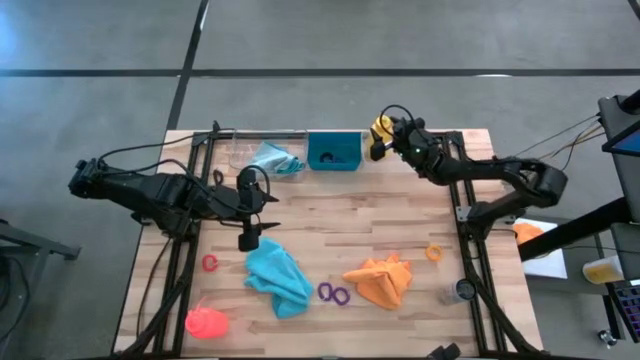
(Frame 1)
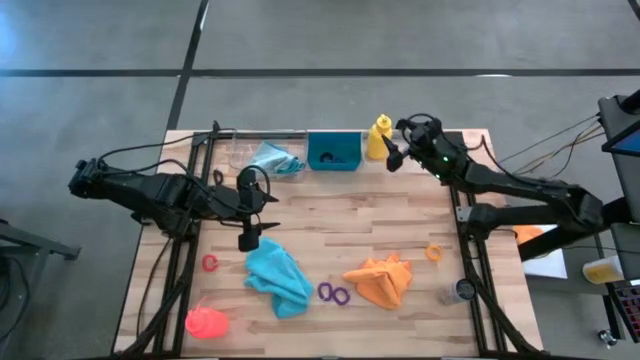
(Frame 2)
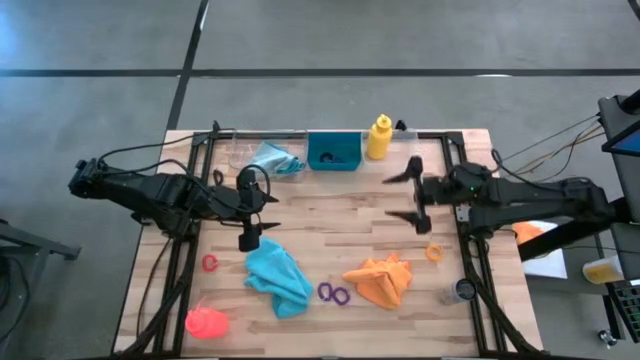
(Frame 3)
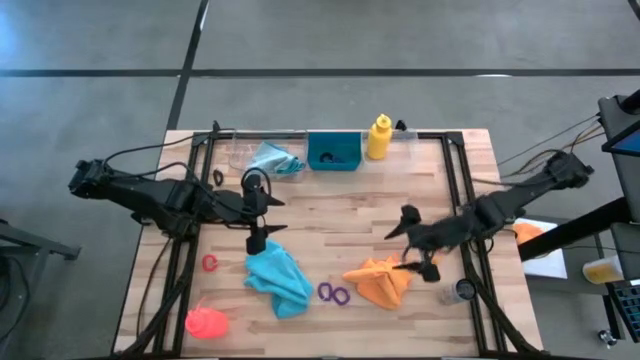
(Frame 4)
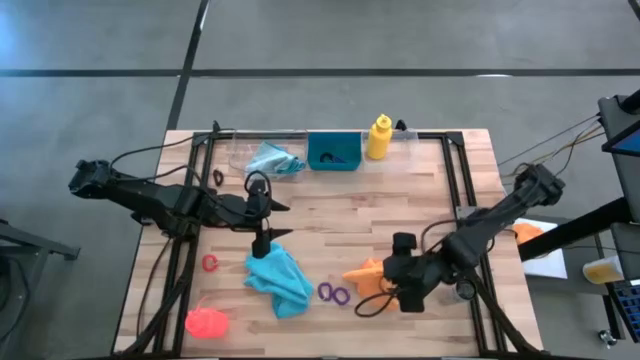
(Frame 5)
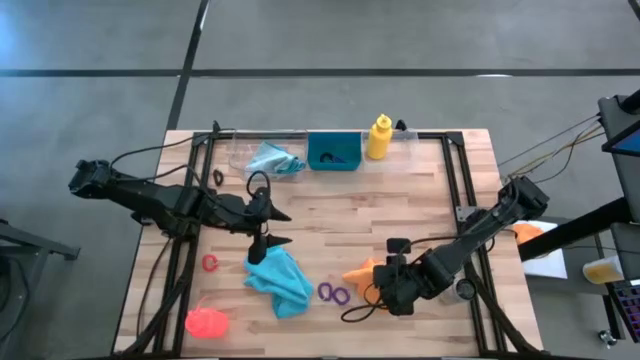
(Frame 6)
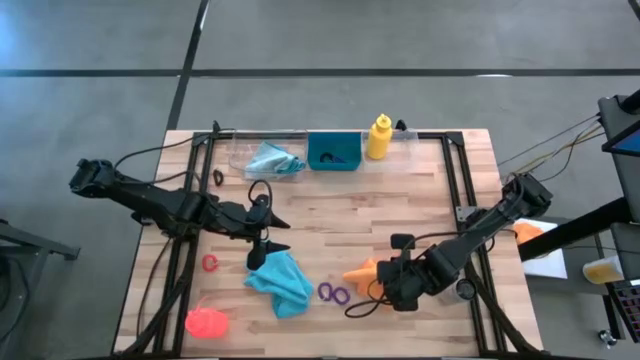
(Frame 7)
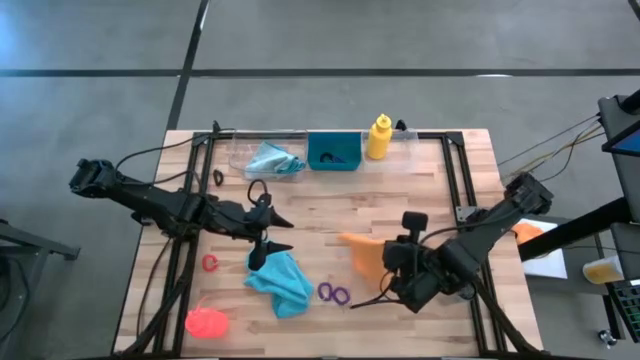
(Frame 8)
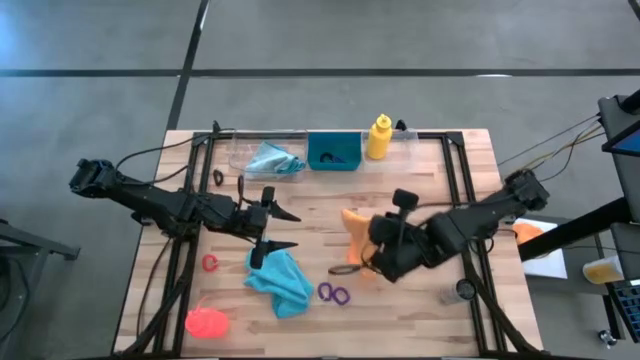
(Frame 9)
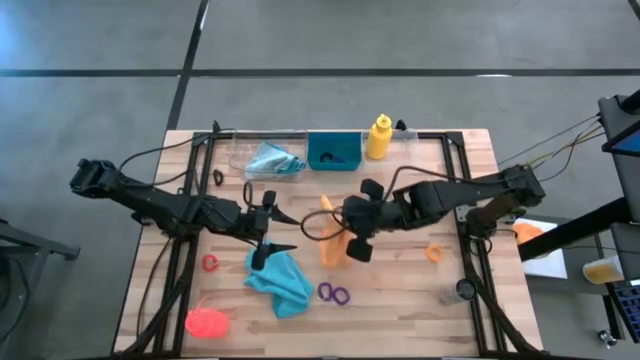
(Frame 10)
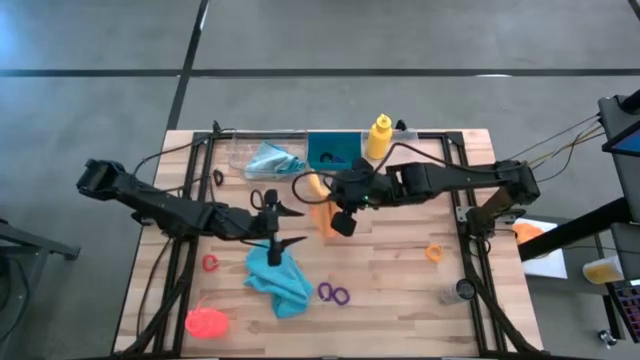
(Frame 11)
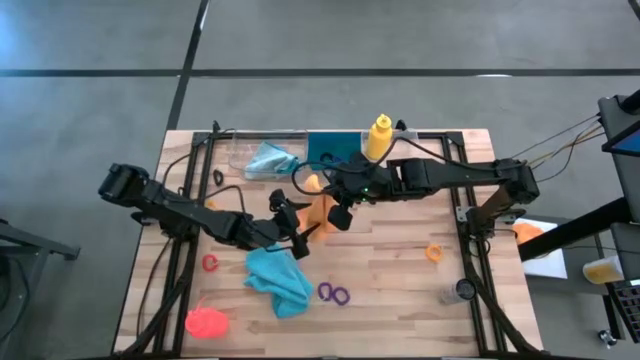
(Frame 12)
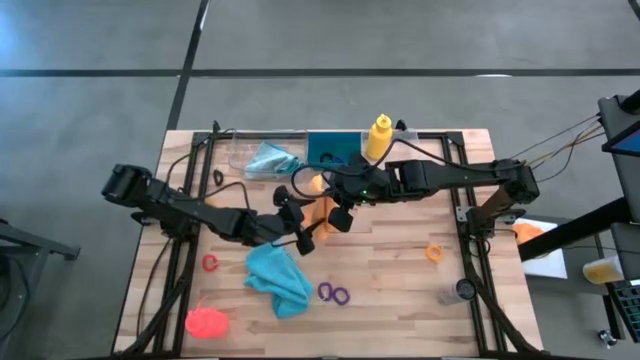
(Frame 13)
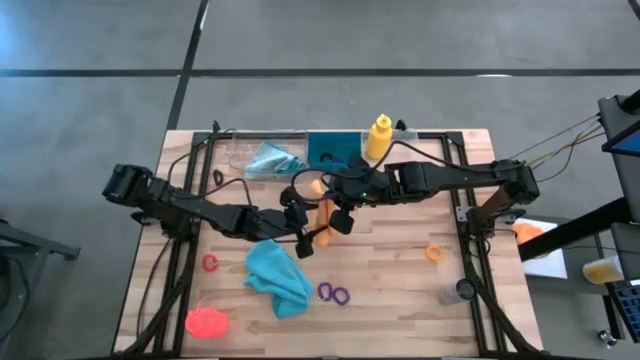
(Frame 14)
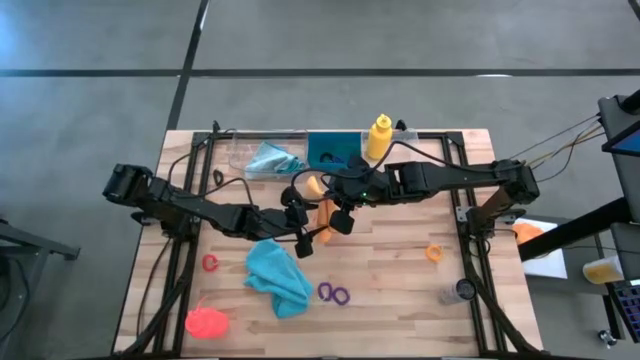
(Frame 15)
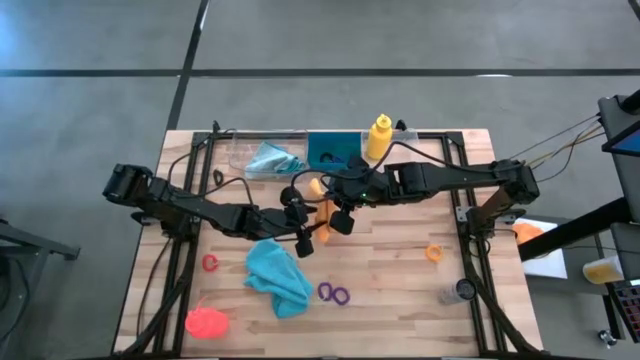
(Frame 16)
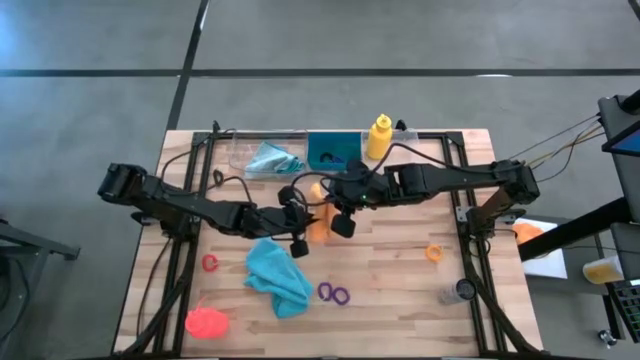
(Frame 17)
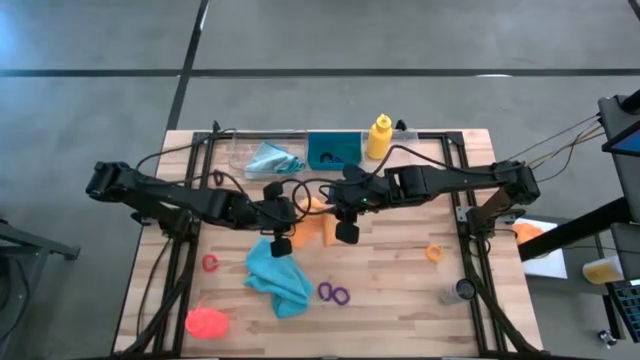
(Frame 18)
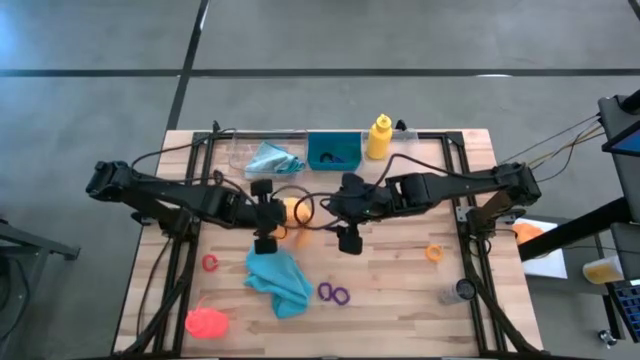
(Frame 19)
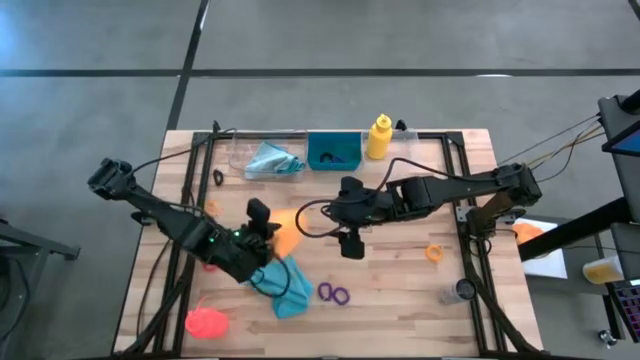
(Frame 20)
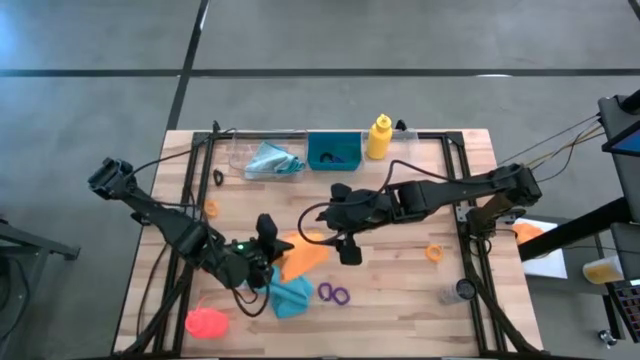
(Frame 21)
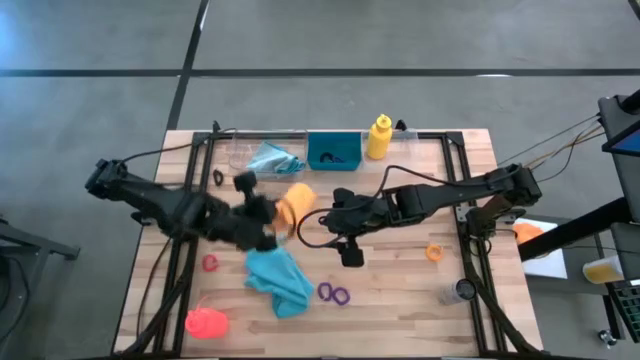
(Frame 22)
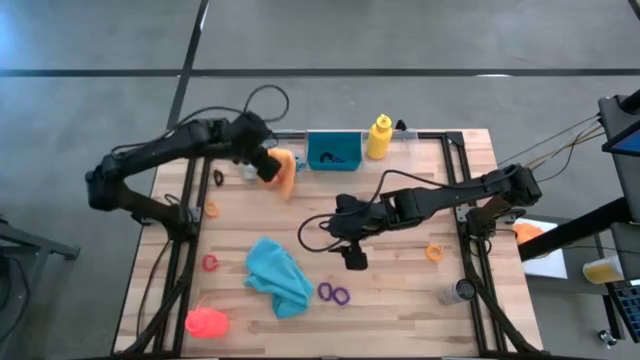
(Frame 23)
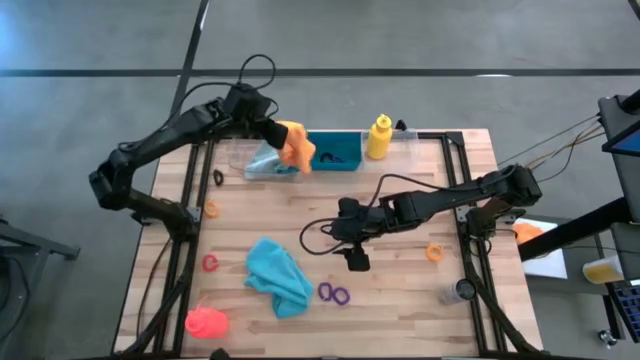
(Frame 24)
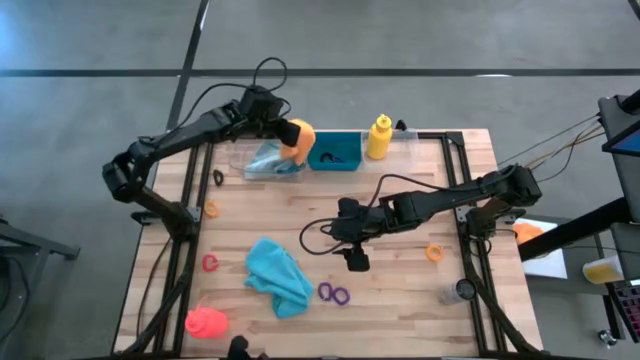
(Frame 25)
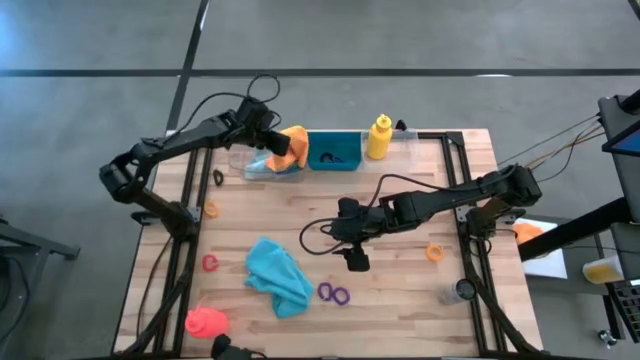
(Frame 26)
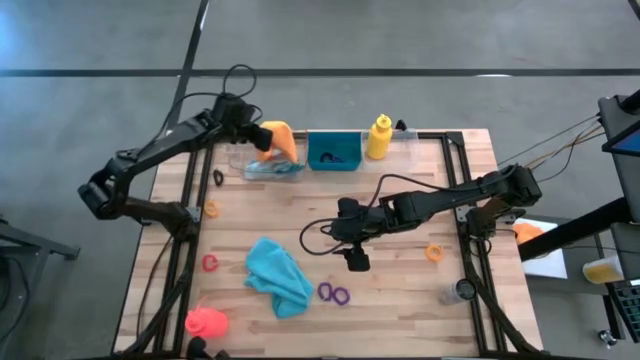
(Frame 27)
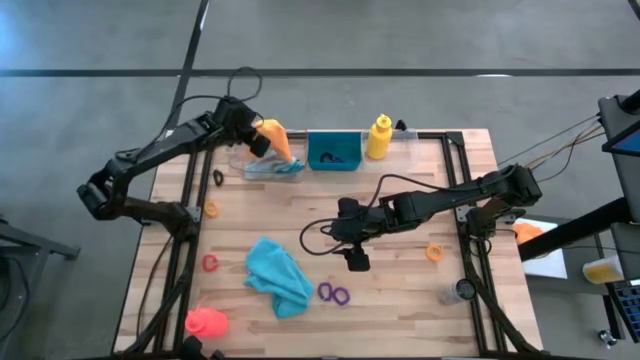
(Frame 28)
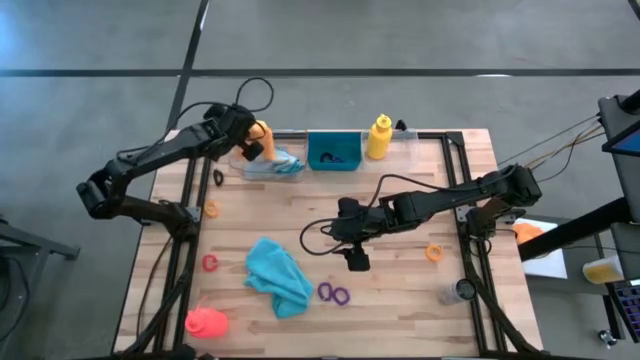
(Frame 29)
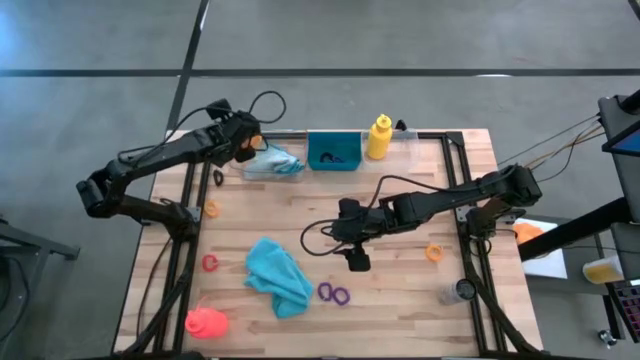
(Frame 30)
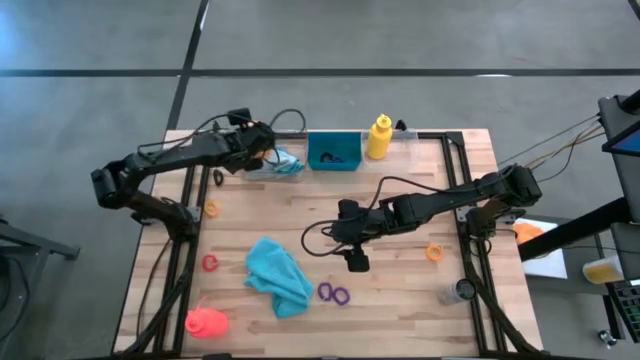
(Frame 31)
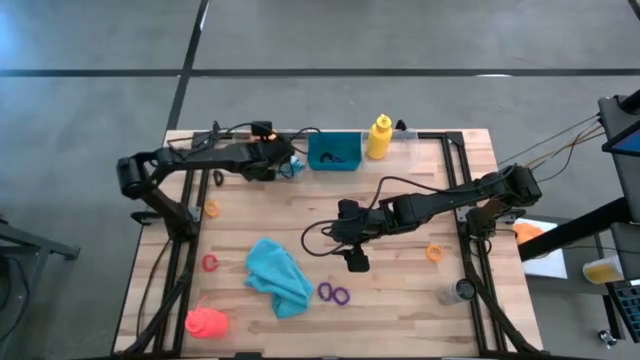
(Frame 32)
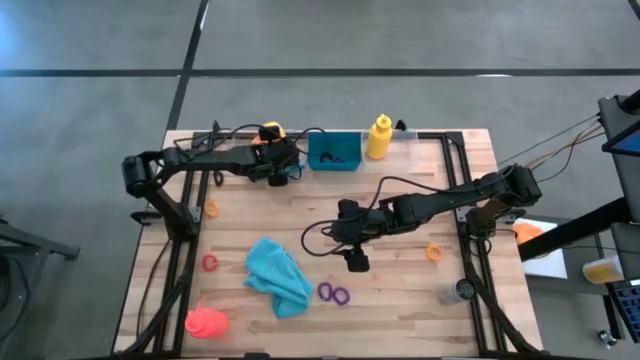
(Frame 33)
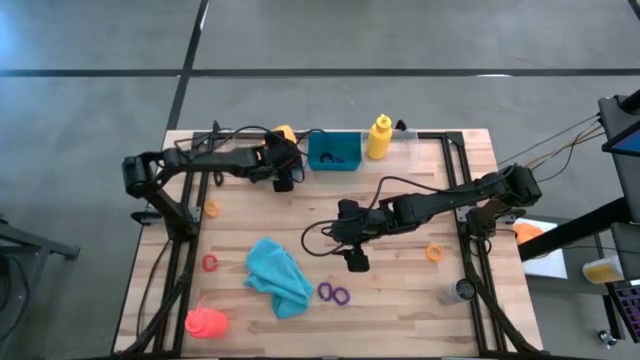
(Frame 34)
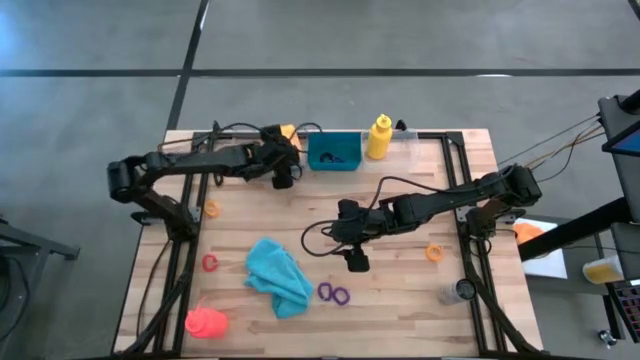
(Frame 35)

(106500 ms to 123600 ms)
Task: Pick & Place Sports Items
Put the orange towel into the transparent bin

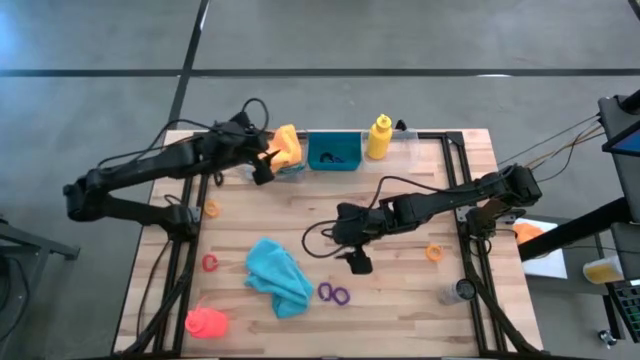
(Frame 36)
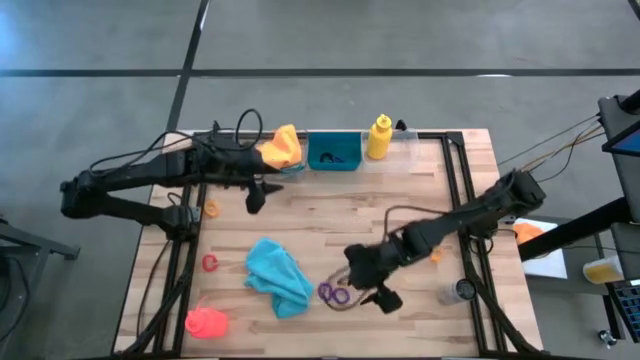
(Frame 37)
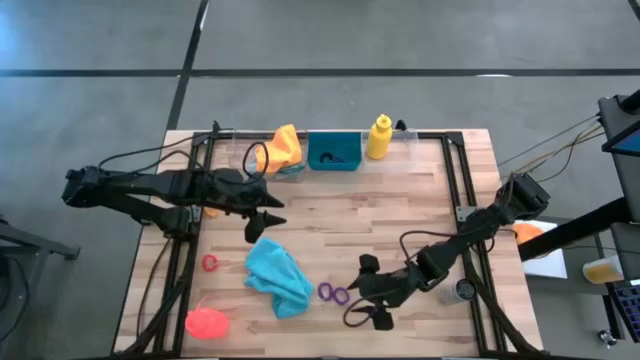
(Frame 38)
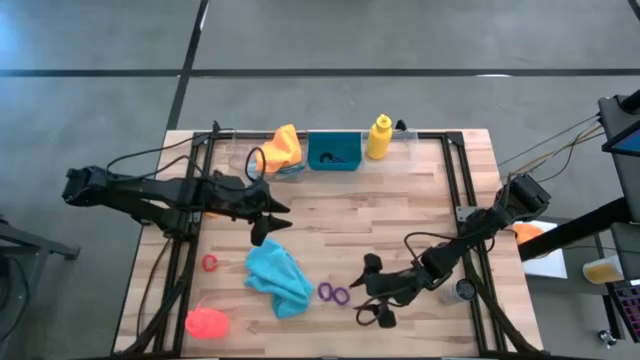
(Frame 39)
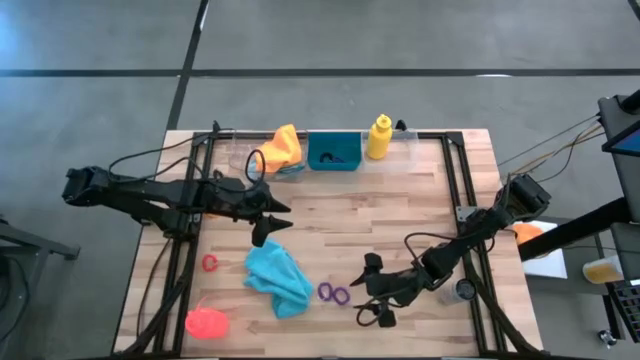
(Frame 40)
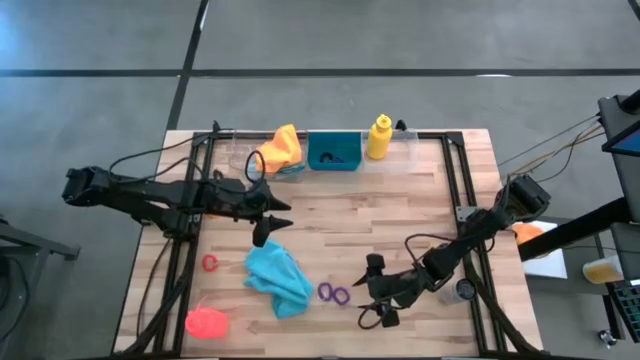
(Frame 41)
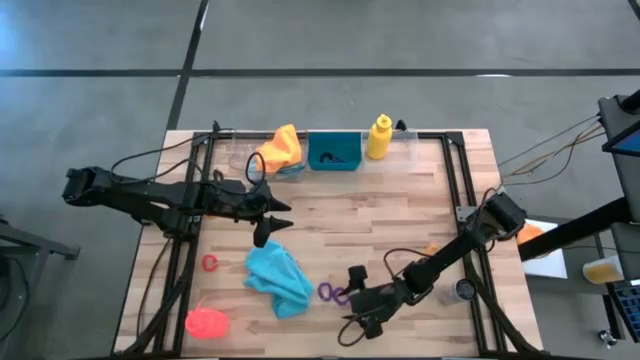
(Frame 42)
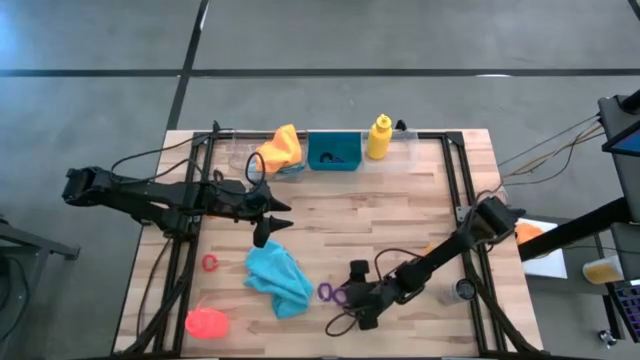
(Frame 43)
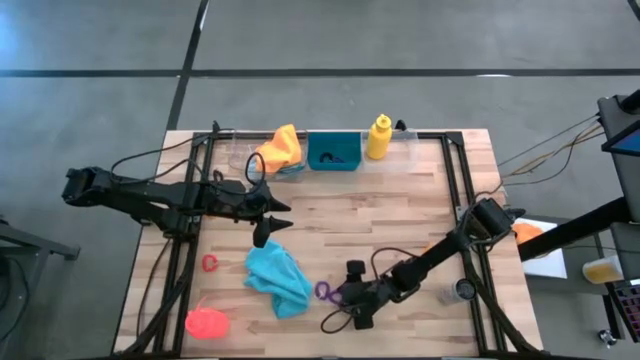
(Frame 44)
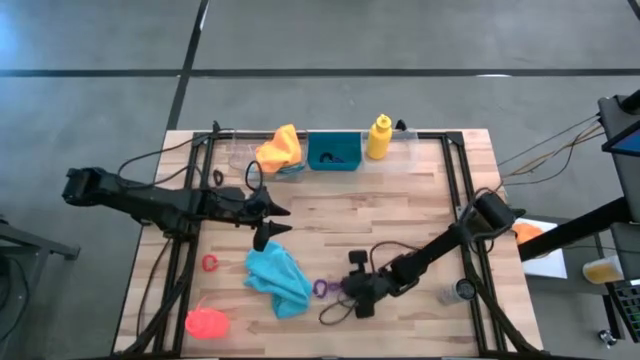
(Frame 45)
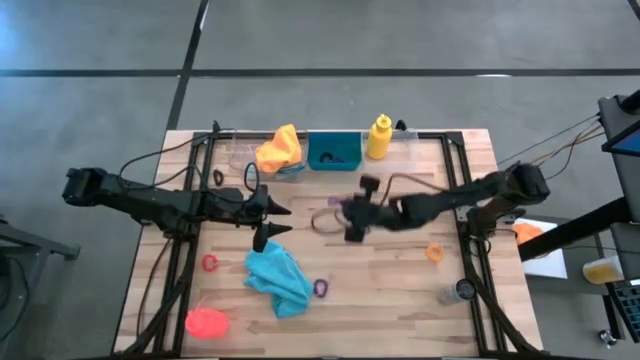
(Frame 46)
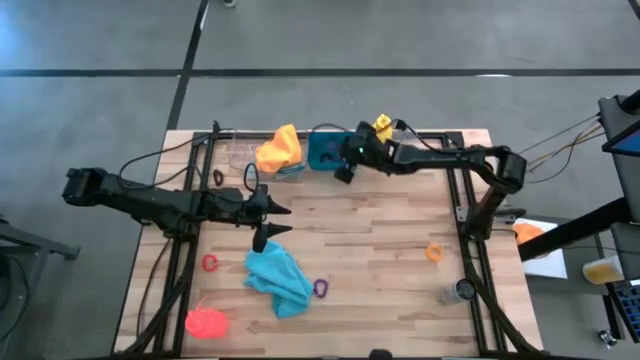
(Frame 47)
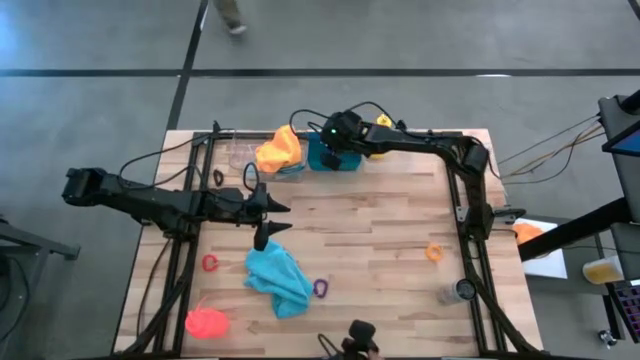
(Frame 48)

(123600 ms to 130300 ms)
Put the right purple spring keychain into the blue bin
